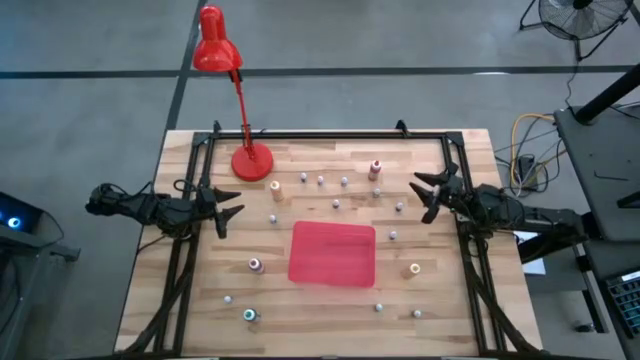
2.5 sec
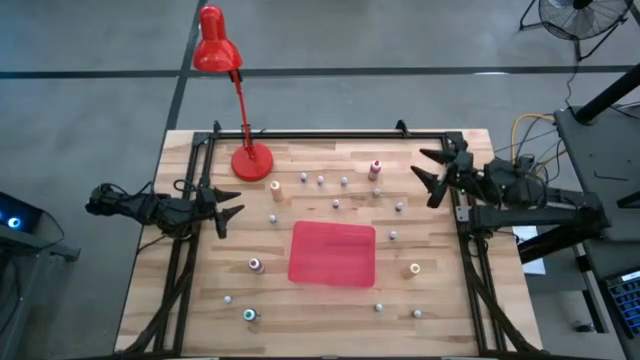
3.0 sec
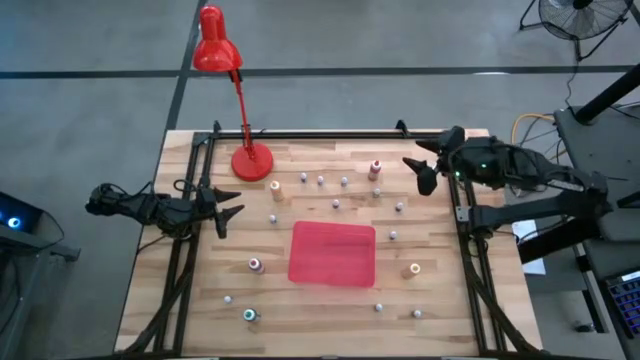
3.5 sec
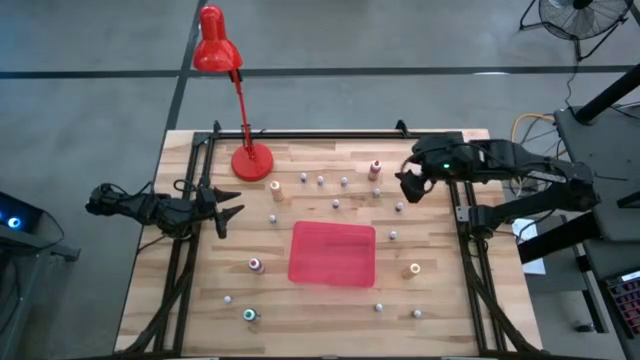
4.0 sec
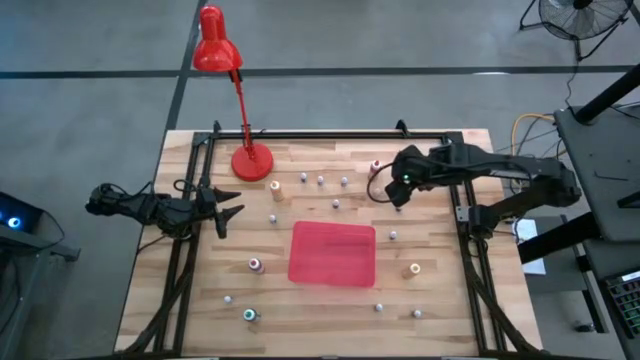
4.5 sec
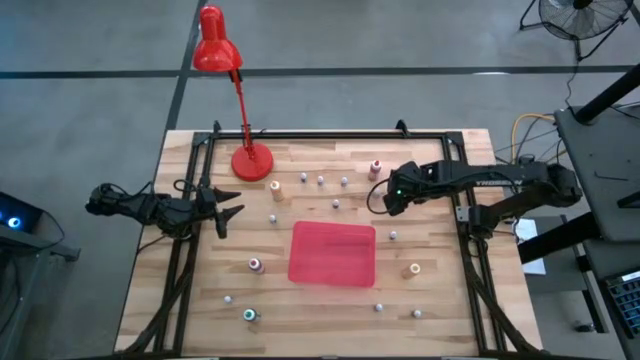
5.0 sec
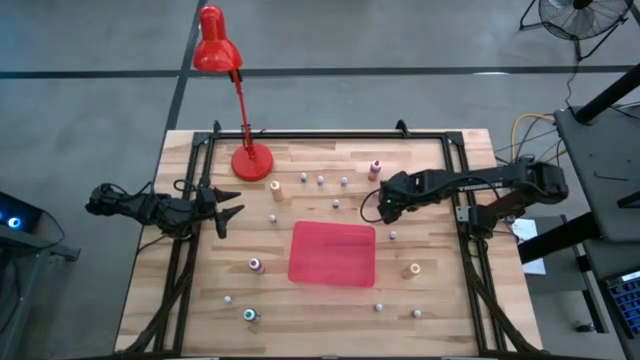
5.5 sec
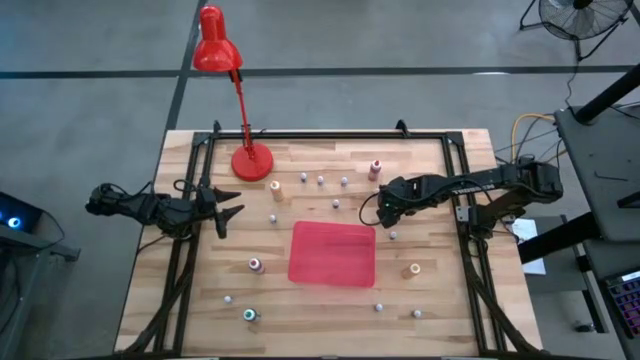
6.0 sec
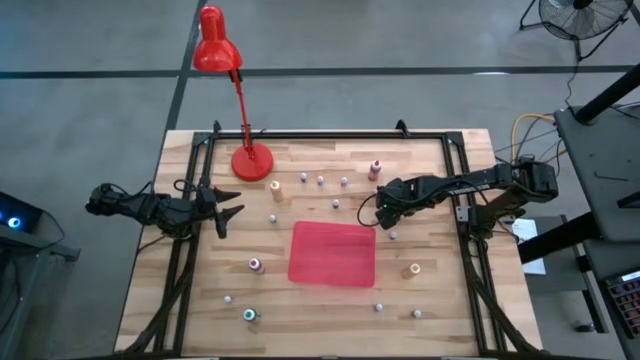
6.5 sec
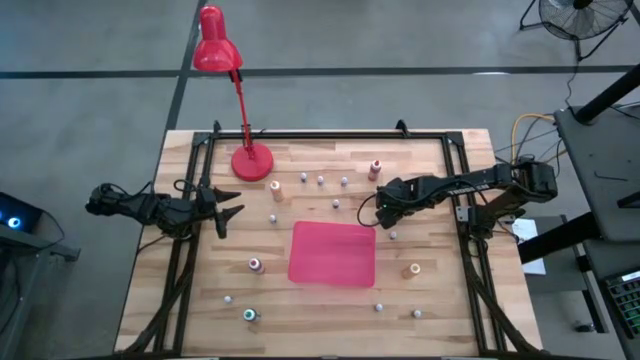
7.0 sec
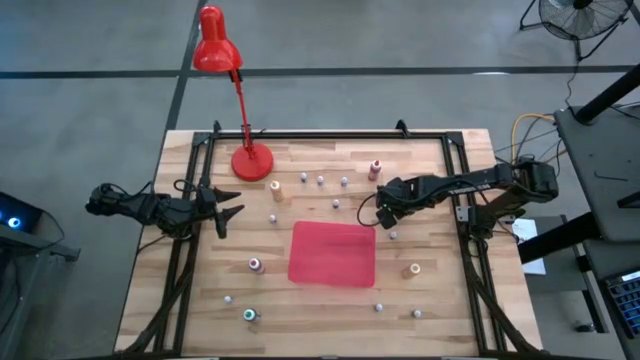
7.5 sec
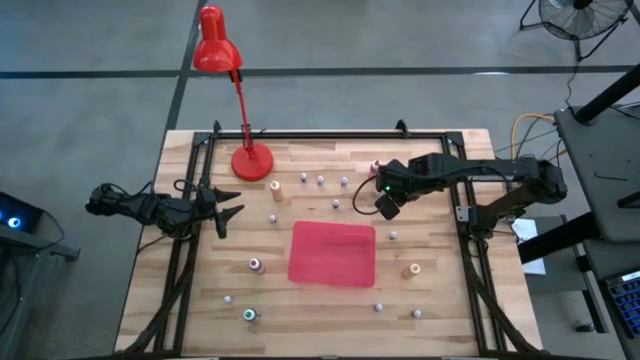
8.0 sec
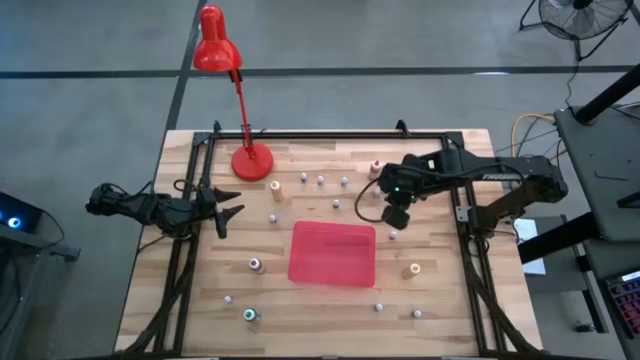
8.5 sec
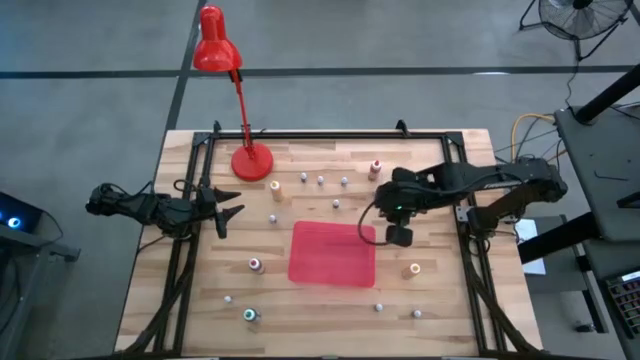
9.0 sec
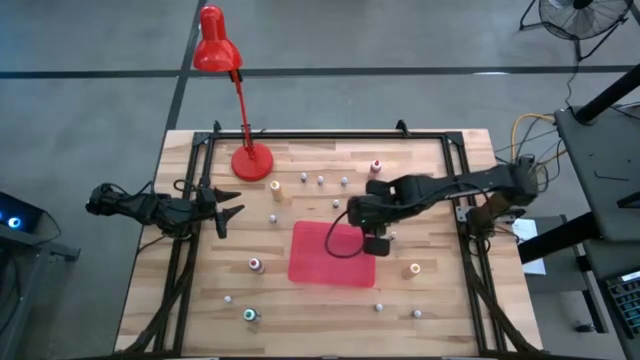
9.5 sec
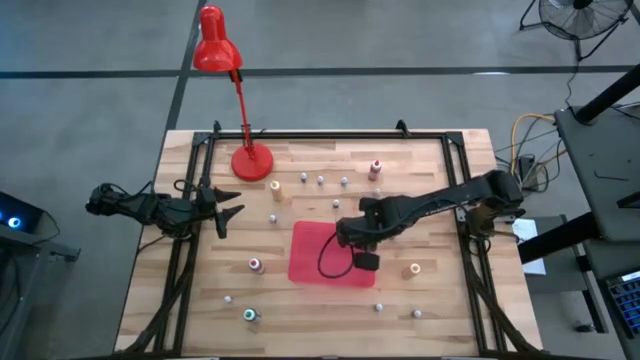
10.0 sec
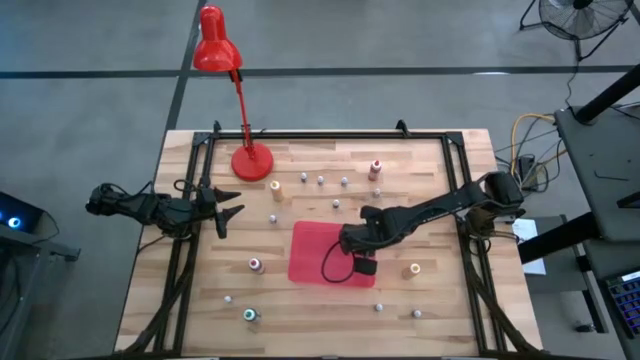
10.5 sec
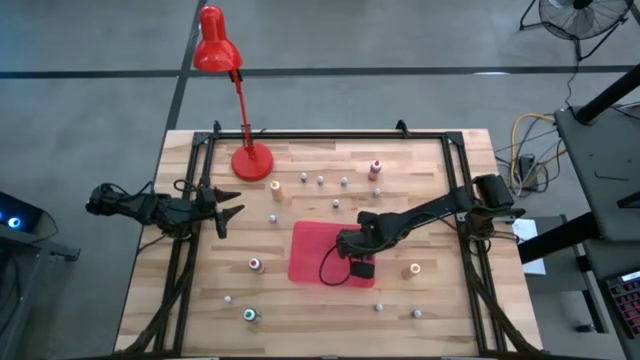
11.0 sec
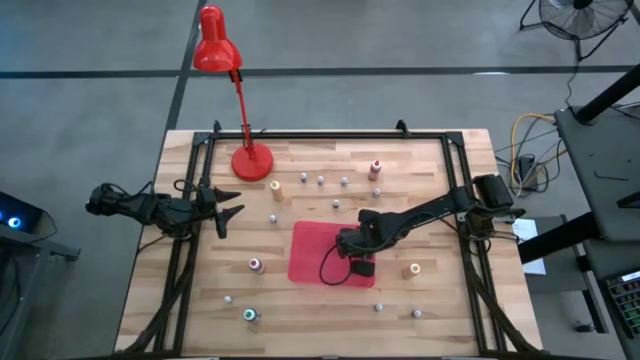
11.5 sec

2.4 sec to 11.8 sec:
Task: Pick & Place food coloring
Put the small red food coloring bottle in the red bin

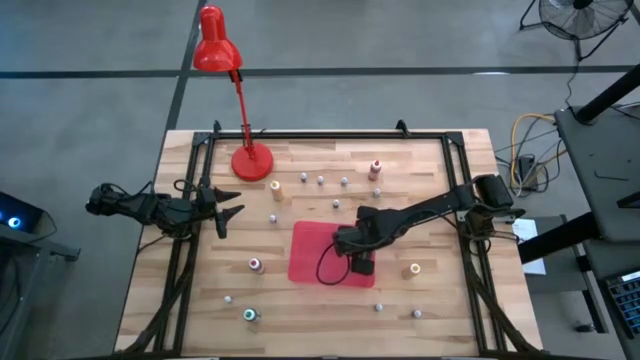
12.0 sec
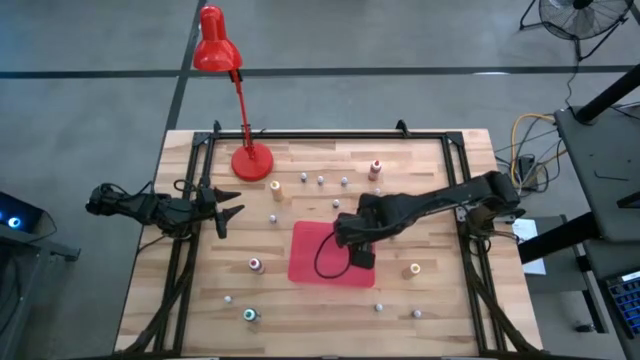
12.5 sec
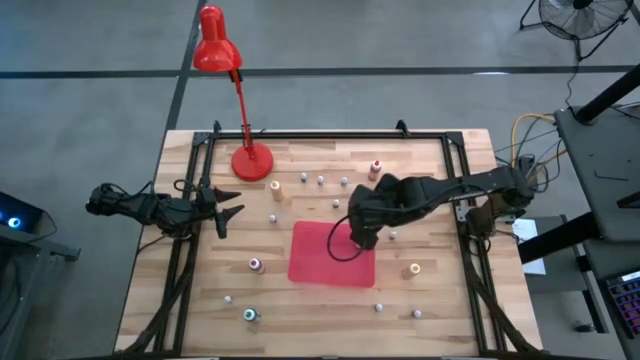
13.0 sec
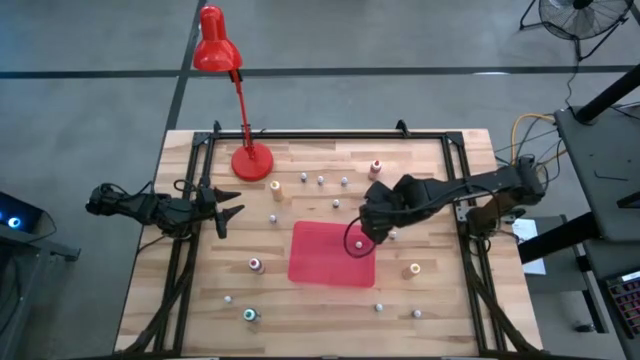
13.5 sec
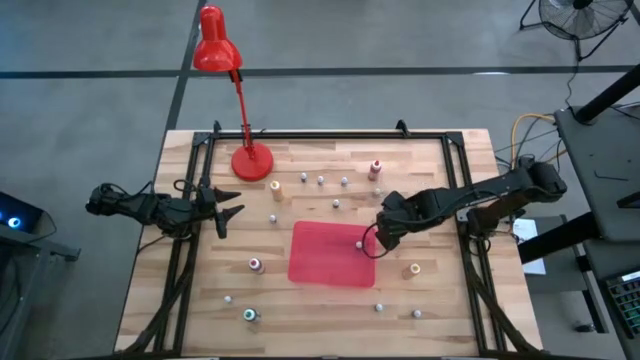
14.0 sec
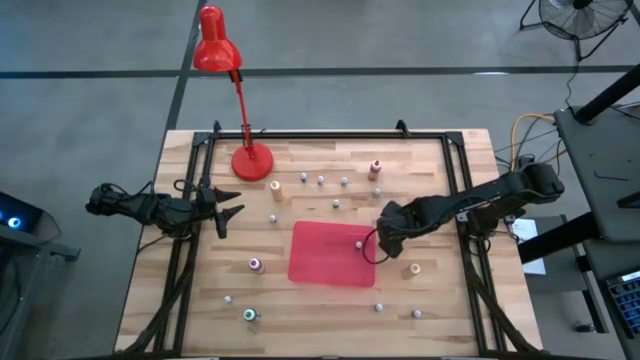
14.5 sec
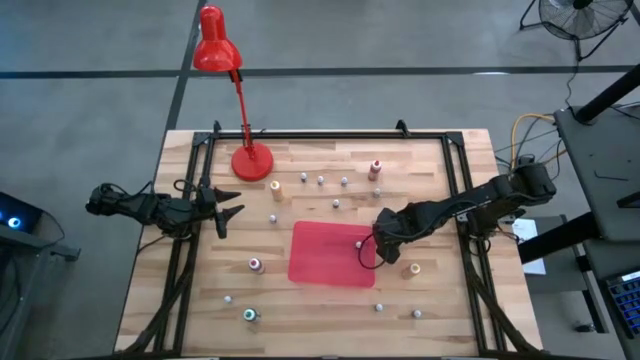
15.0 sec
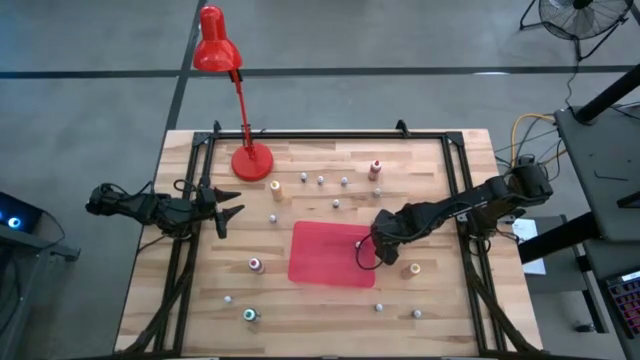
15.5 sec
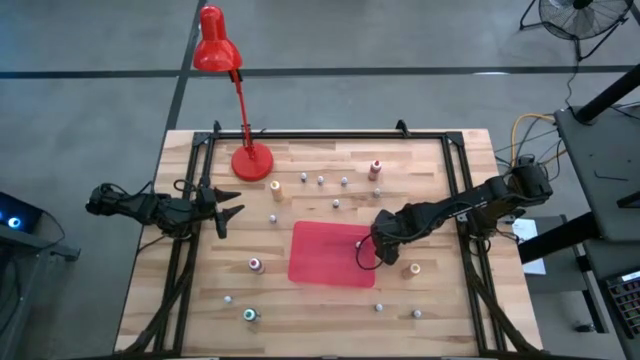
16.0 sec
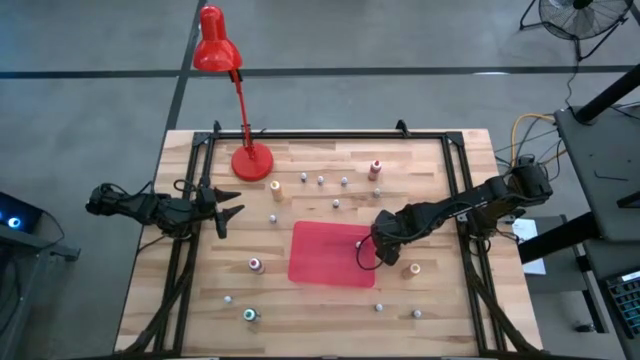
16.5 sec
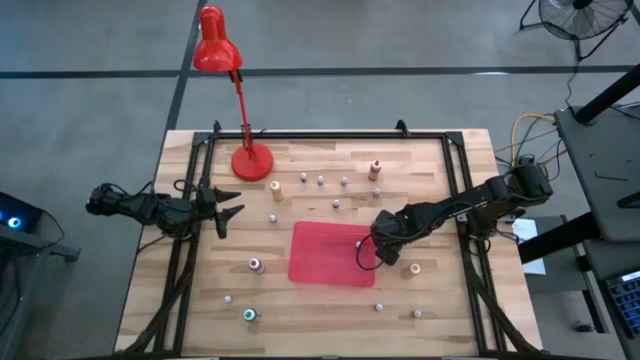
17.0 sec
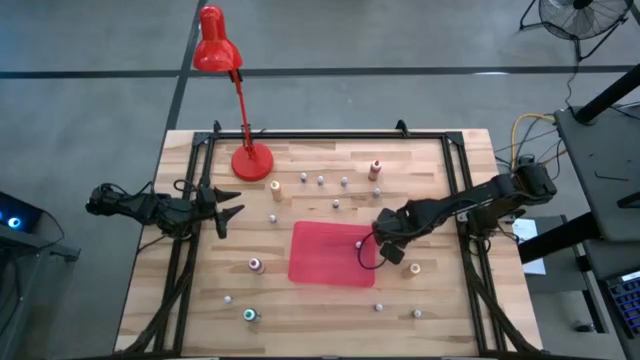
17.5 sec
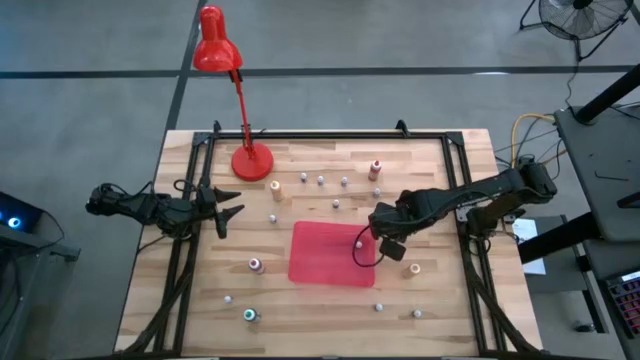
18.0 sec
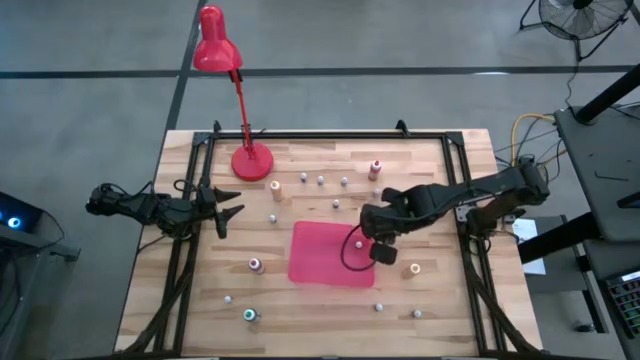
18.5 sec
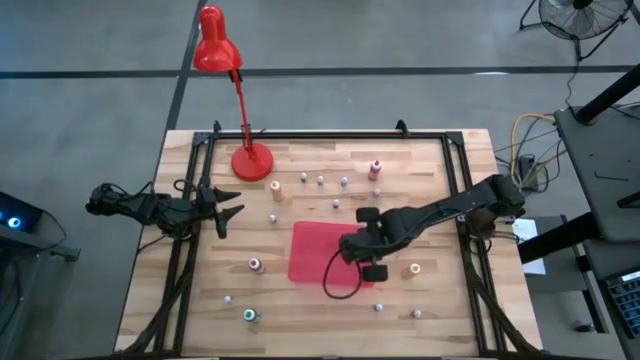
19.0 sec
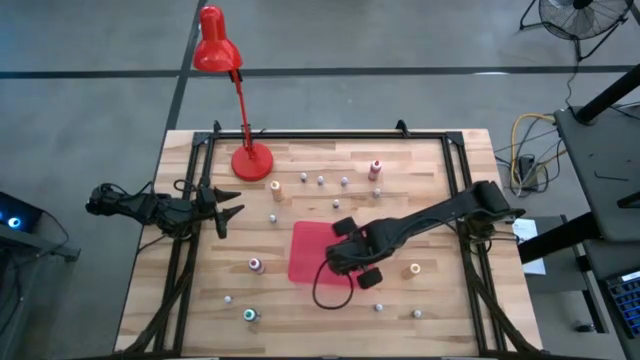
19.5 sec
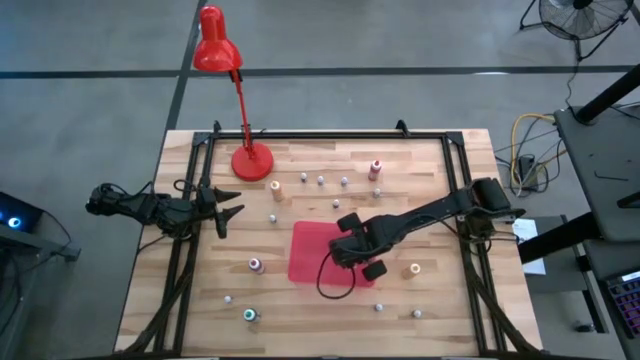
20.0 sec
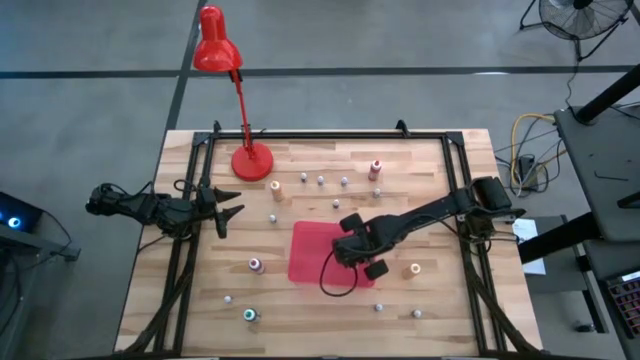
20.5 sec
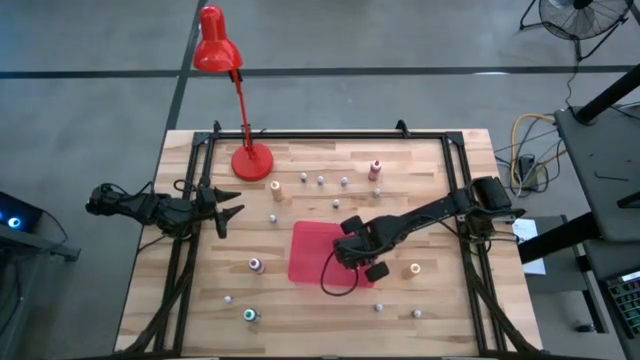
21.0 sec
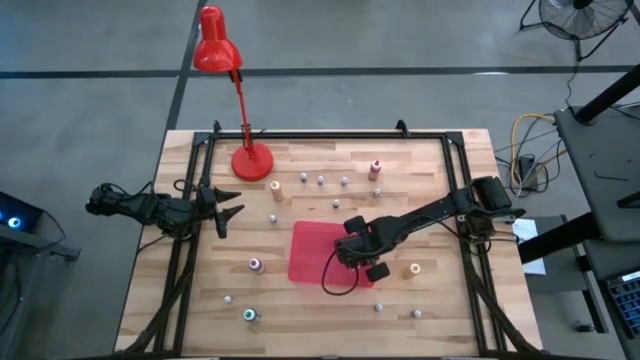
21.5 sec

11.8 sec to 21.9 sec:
Put the small black food coloring bottle in the red bin
